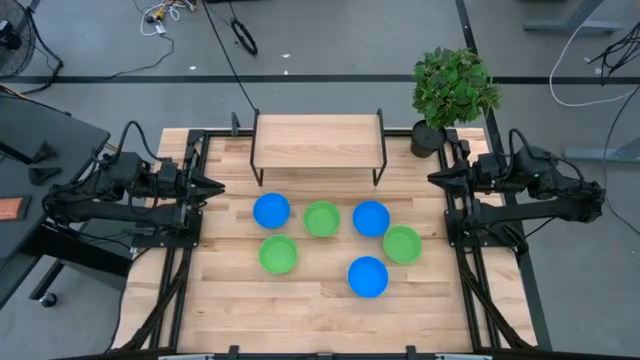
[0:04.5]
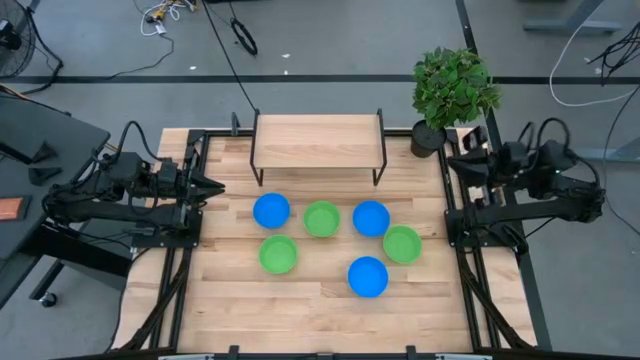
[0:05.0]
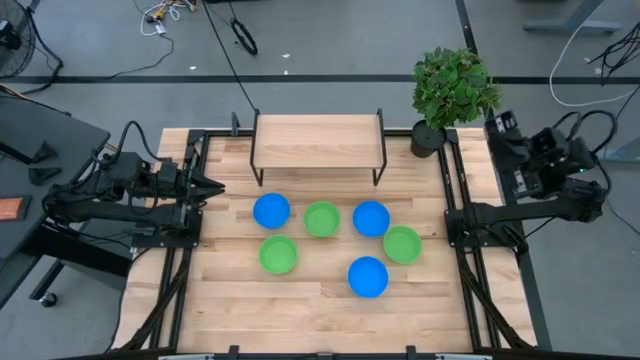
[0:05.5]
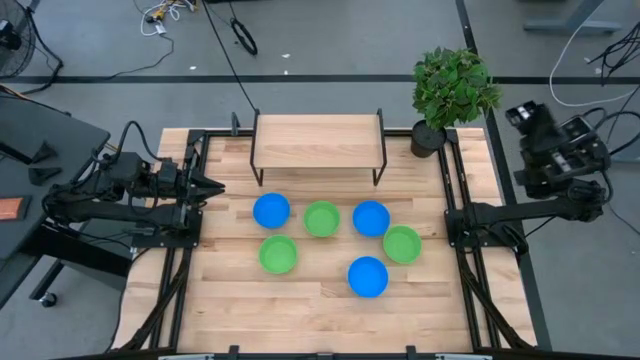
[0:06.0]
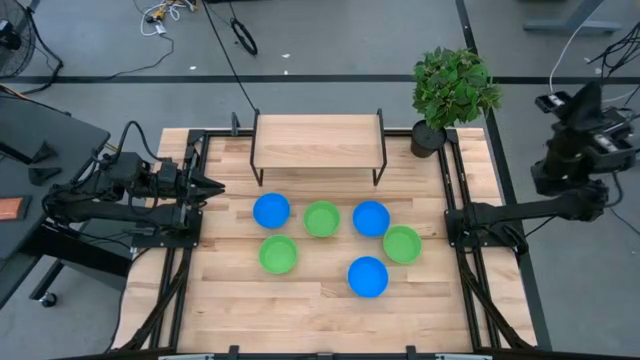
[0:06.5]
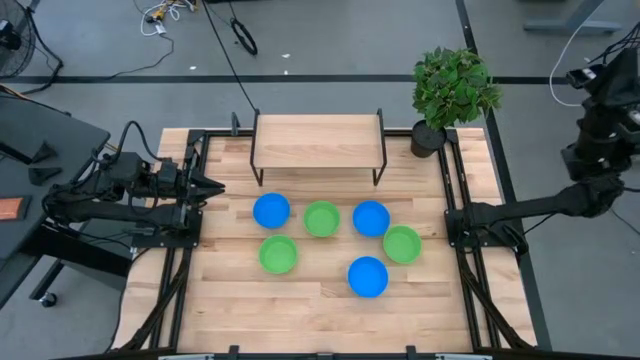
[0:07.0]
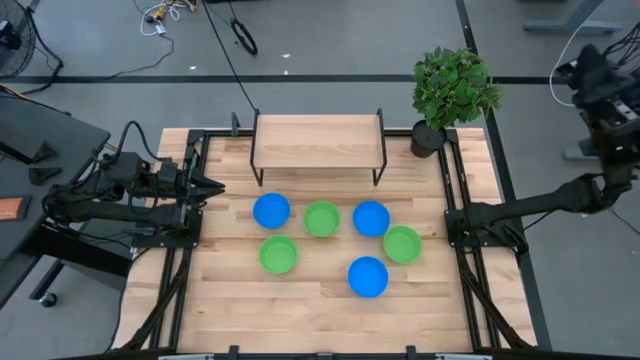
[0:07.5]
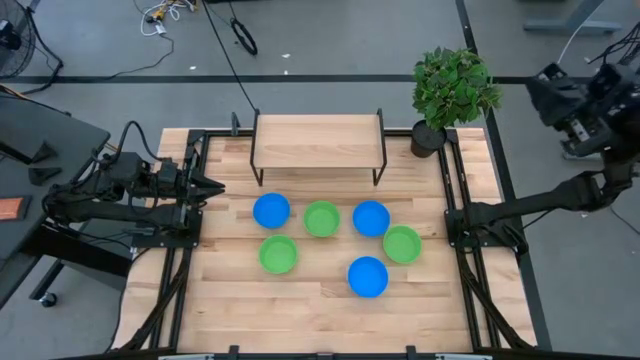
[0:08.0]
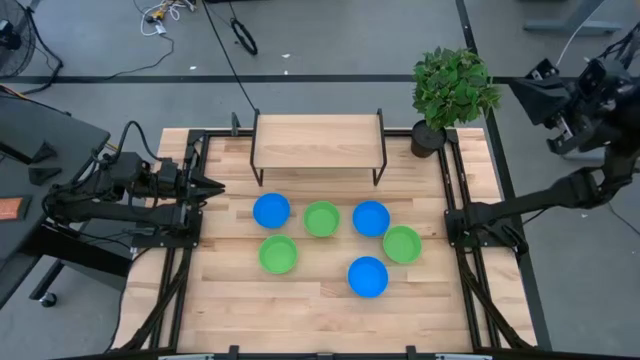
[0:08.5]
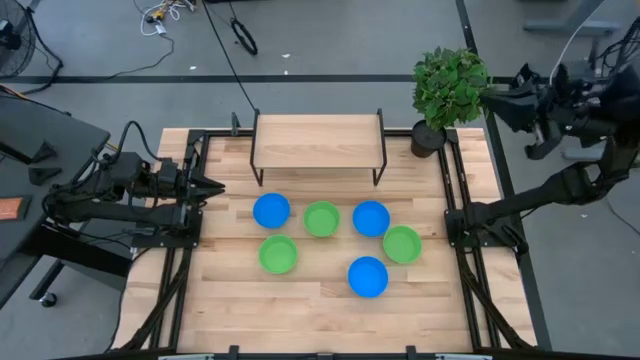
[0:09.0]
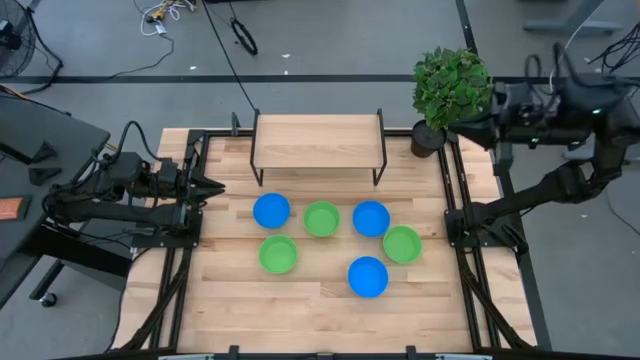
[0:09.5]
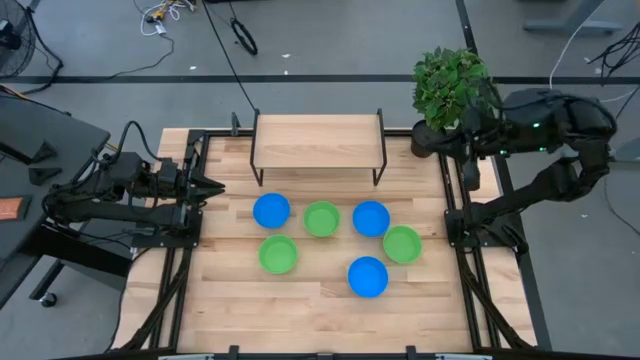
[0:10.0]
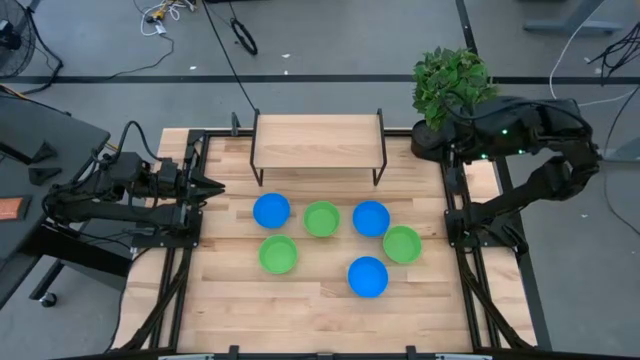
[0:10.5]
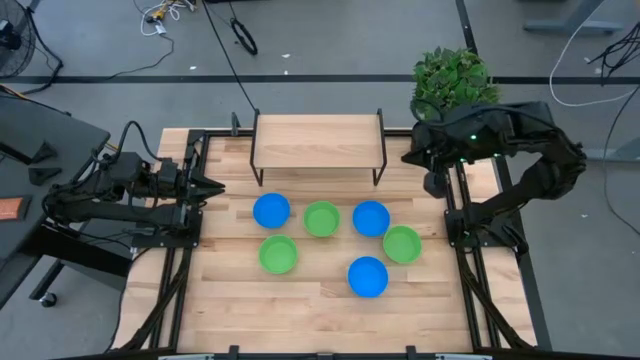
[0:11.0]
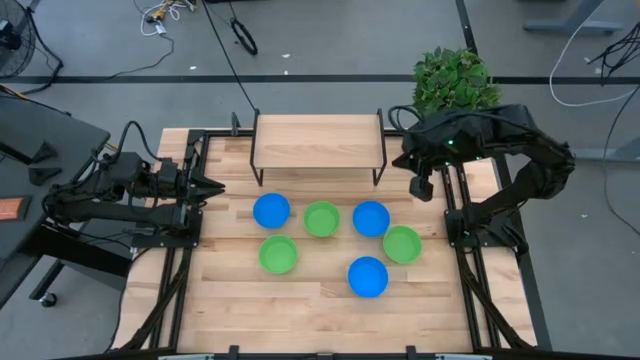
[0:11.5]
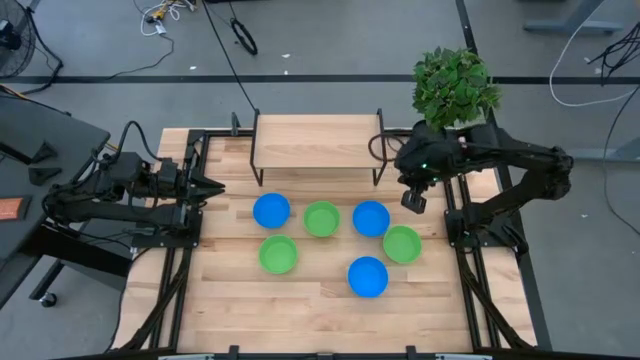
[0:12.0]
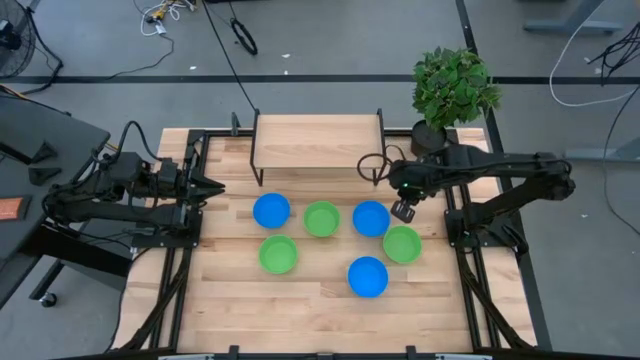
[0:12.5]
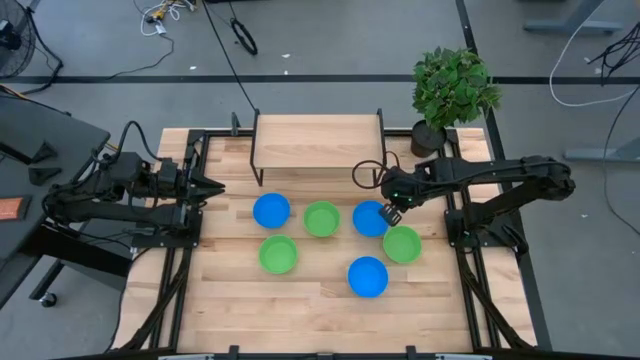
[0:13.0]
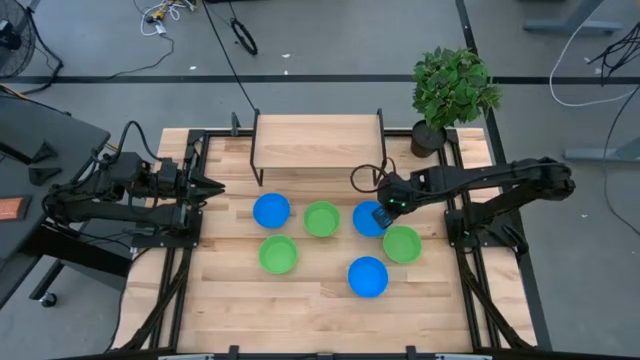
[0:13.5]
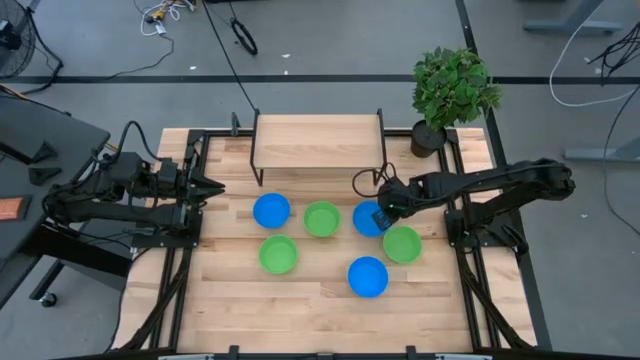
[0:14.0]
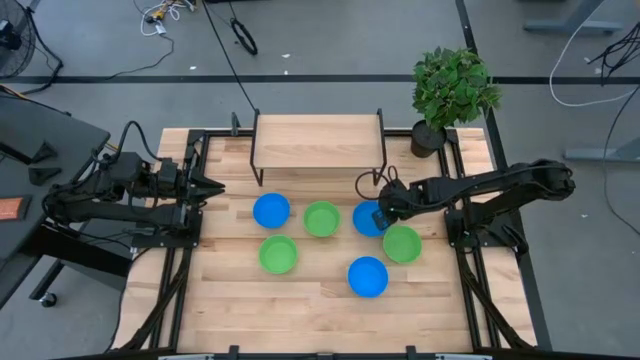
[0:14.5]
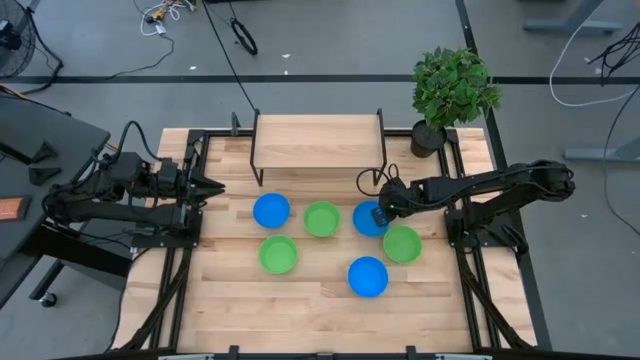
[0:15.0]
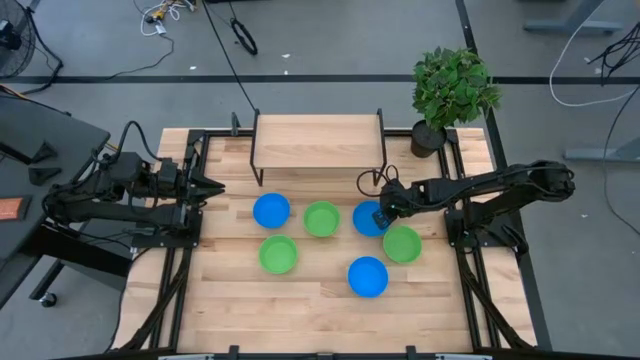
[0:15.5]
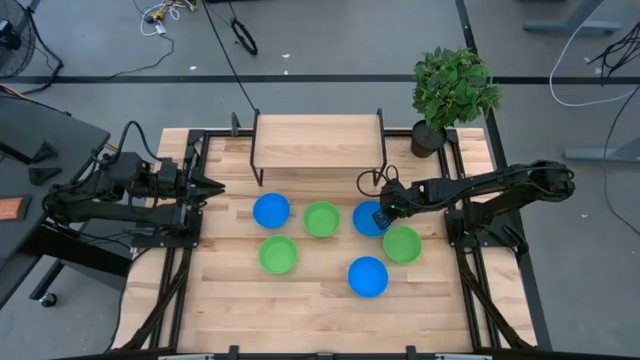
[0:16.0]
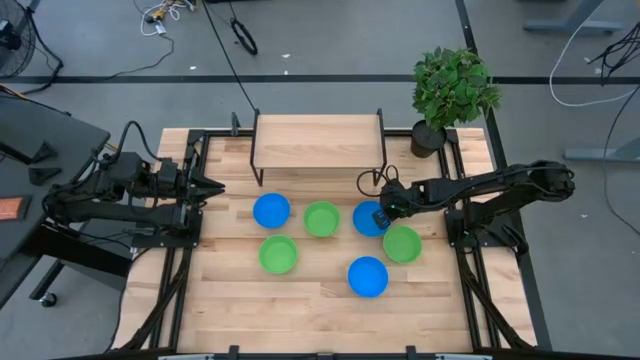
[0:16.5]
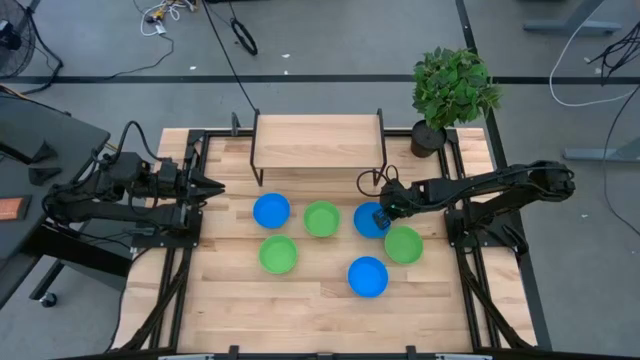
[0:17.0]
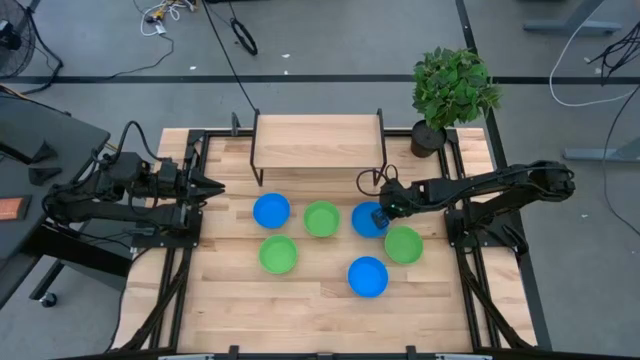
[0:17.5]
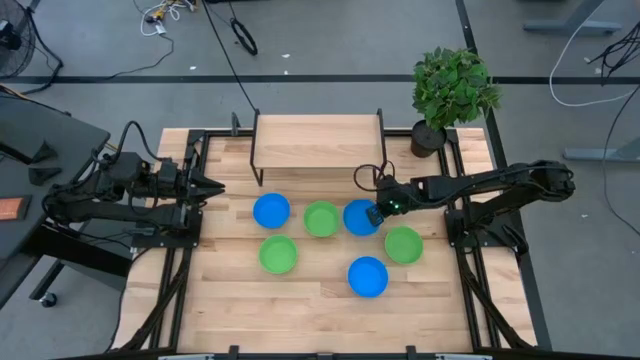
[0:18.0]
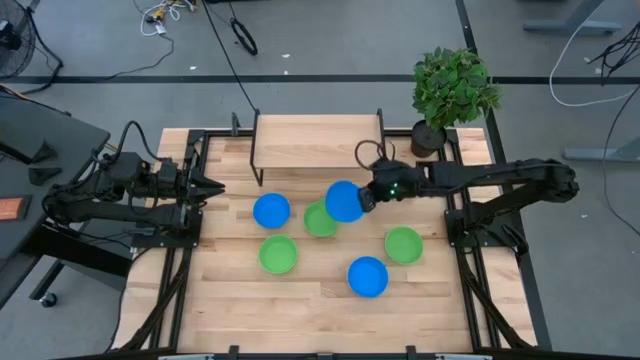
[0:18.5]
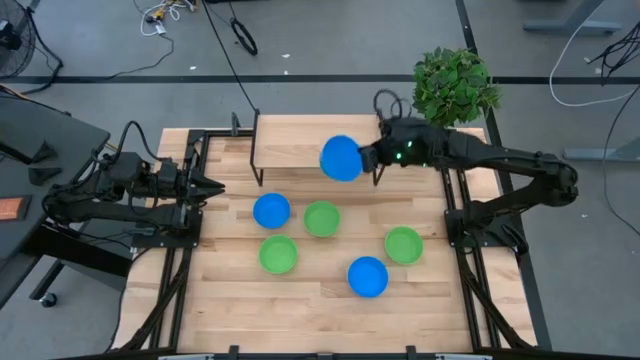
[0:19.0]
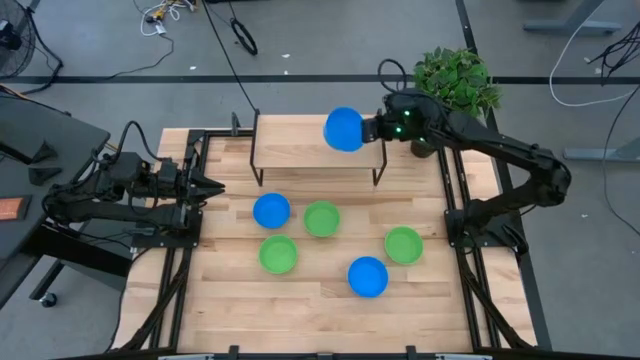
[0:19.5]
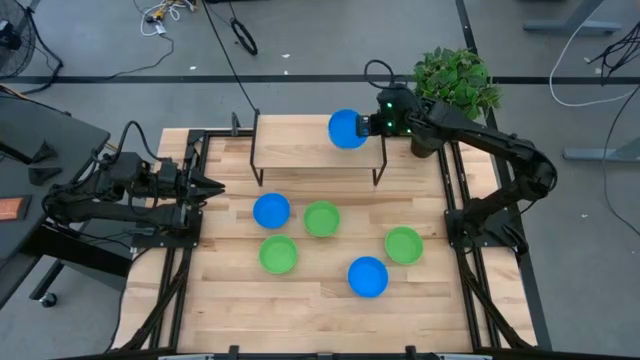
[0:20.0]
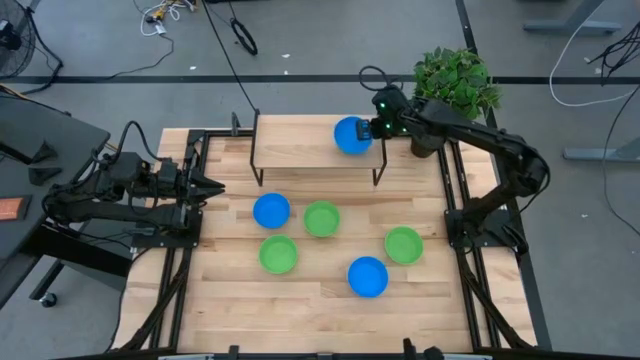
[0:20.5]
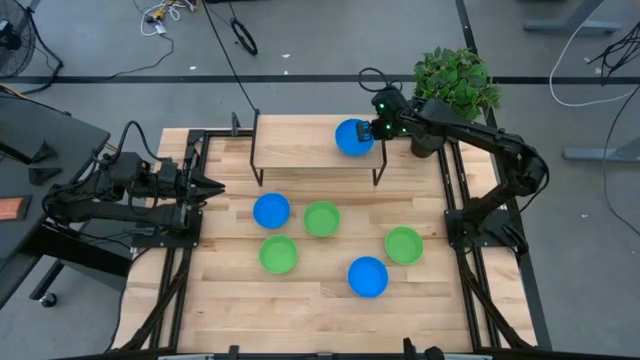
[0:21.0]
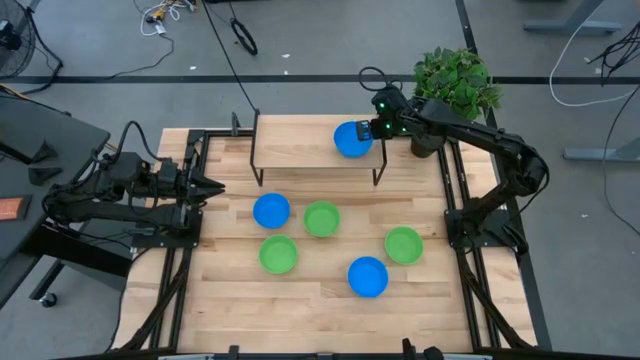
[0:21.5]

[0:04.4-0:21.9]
Task: Pick & Place Mini bowls
Put the top right blue bowl on the shelf

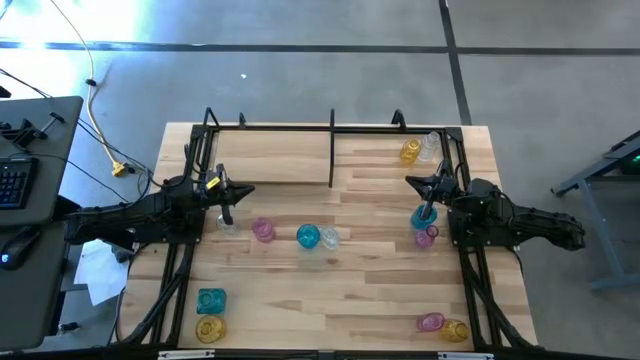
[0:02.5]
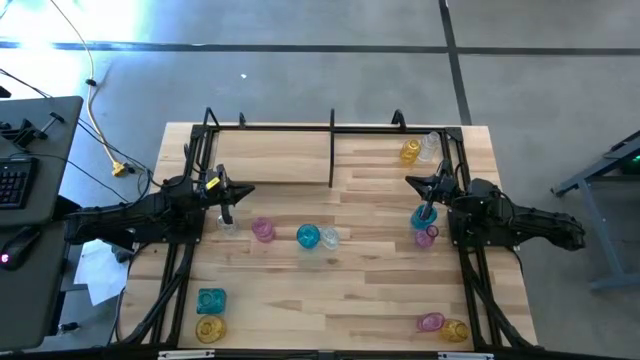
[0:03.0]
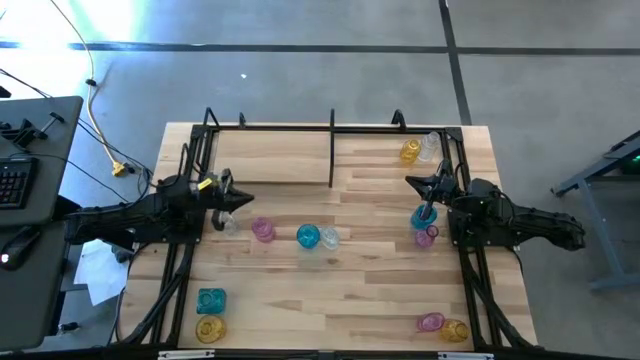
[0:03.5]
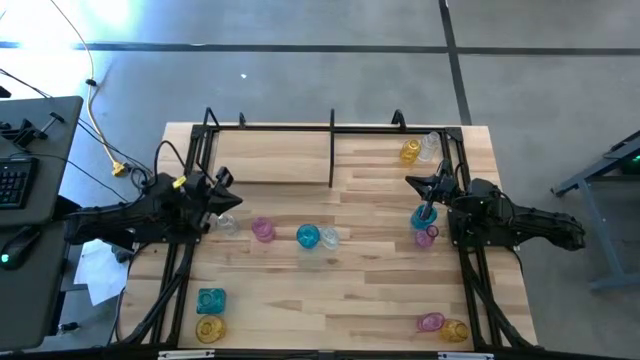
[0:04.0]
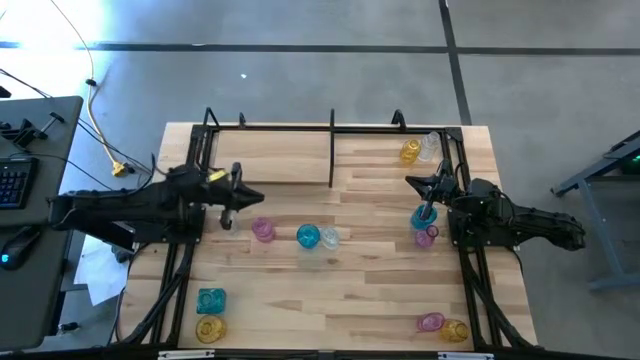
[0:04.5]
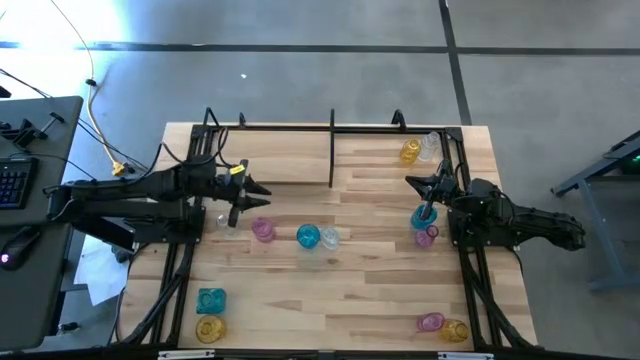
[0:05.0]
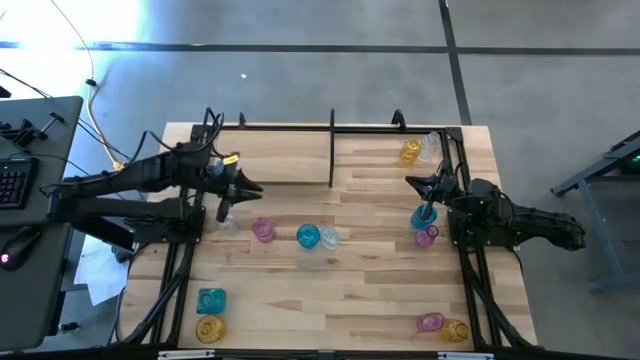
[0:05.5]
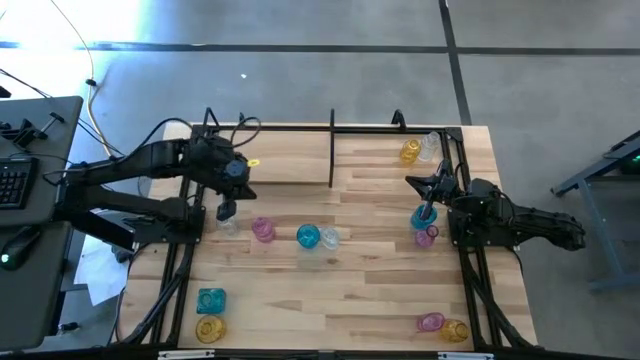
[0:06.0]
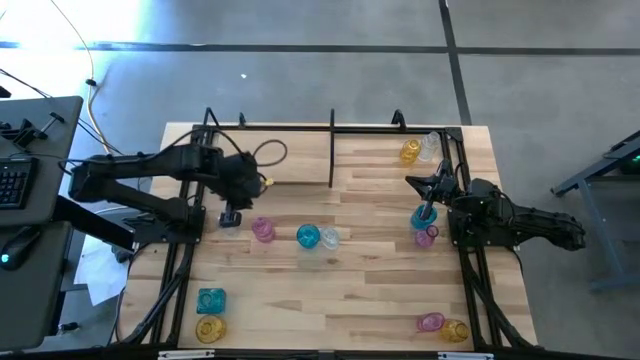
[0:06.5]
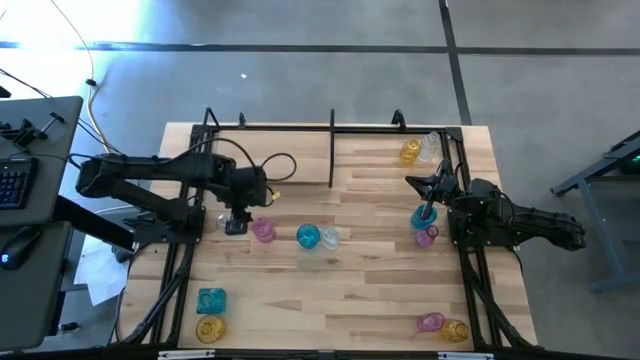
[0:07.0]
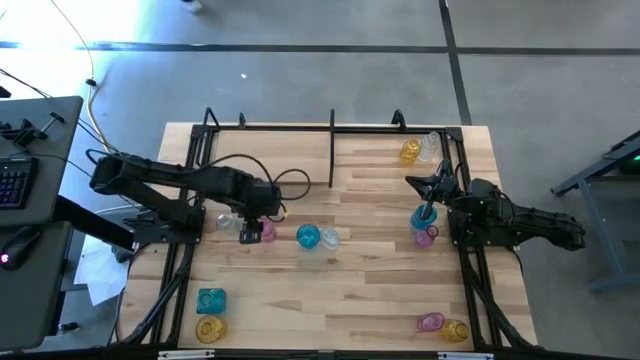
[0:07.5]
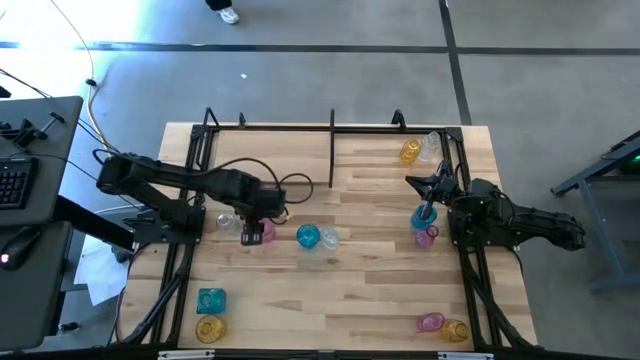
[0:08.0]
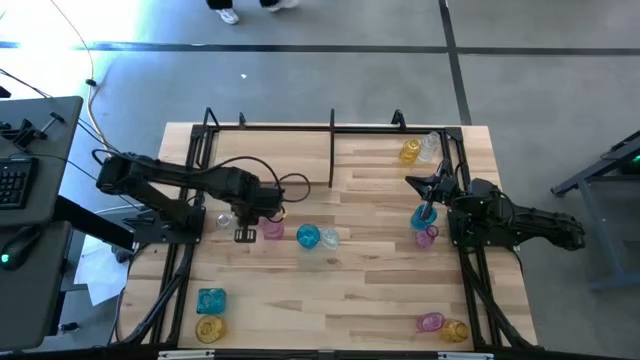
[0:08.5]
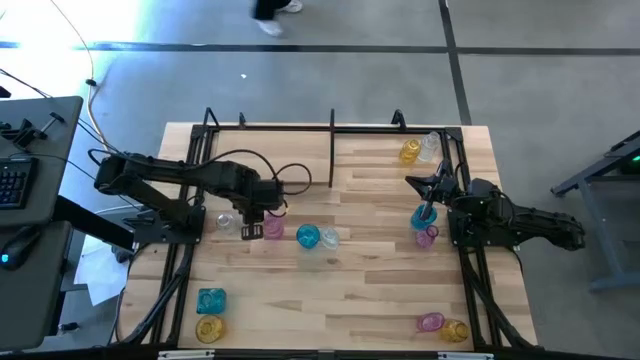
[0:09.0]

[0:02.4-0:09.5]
Task: sort vases onto shelf
Put the middle left purple flower vase on the shelf
